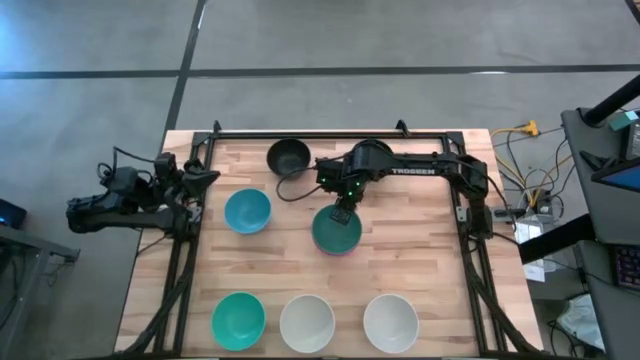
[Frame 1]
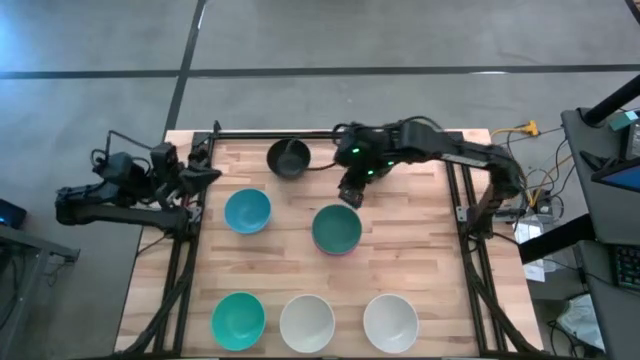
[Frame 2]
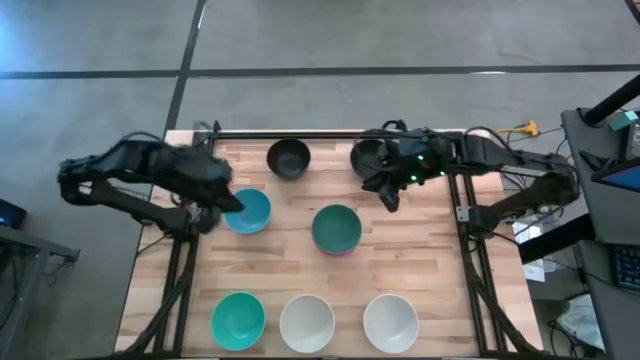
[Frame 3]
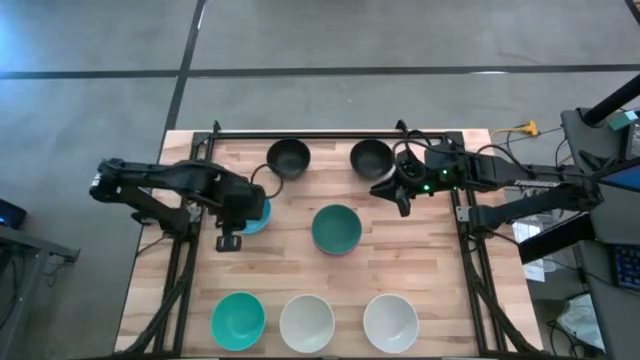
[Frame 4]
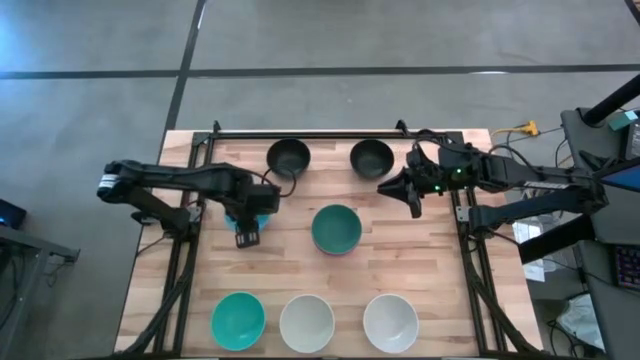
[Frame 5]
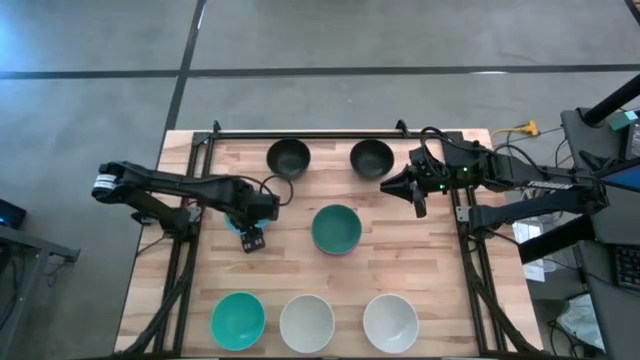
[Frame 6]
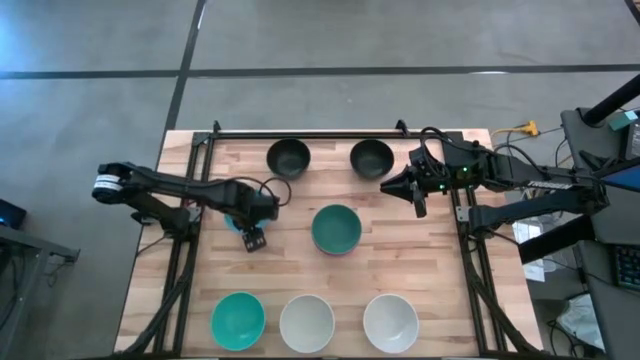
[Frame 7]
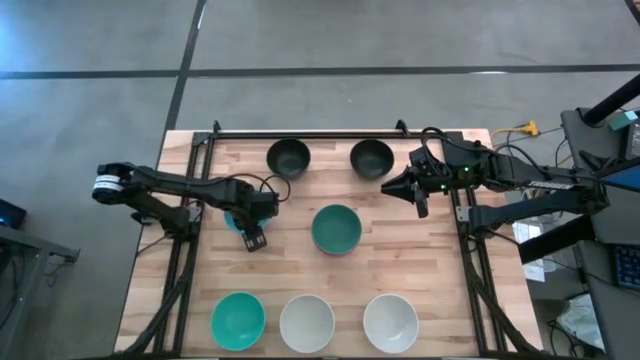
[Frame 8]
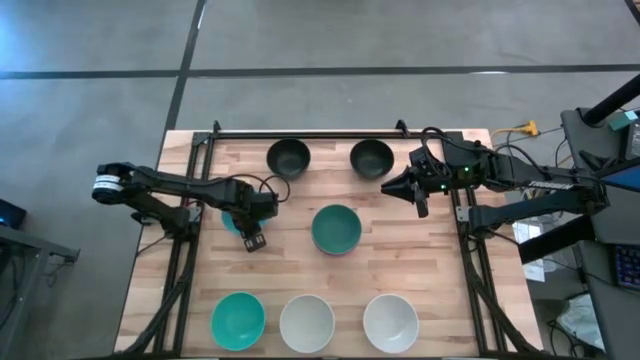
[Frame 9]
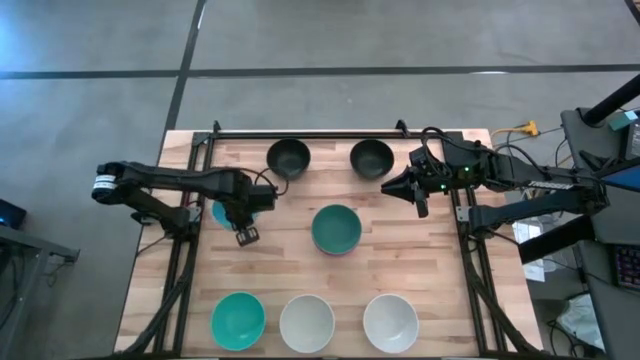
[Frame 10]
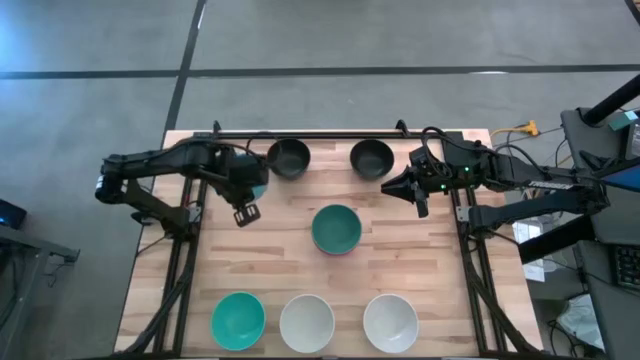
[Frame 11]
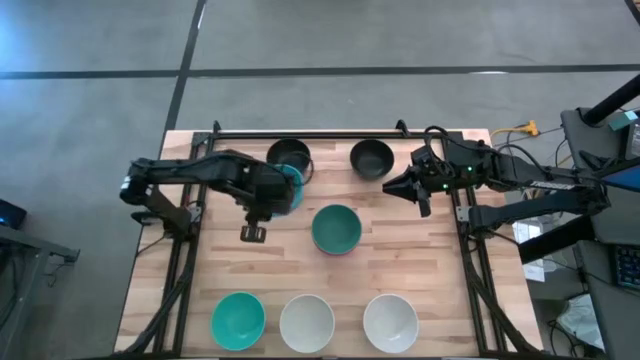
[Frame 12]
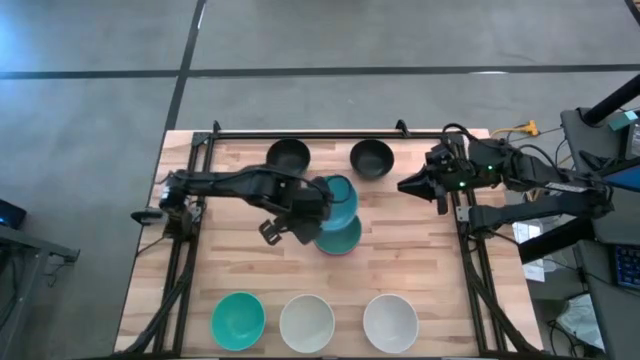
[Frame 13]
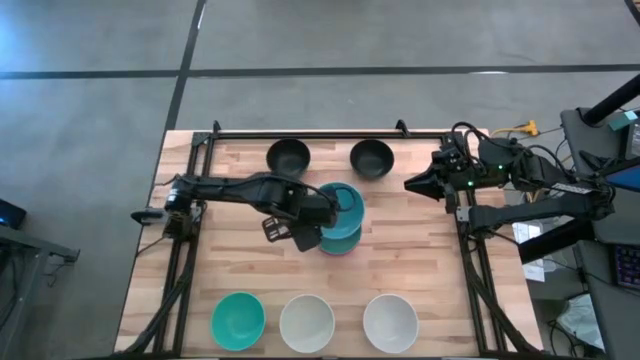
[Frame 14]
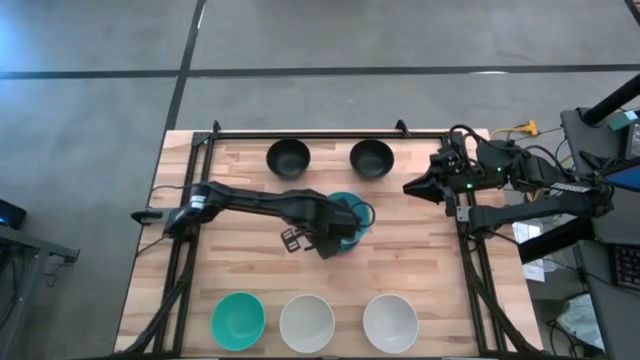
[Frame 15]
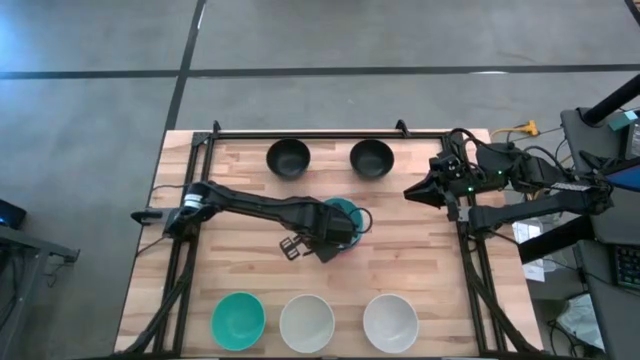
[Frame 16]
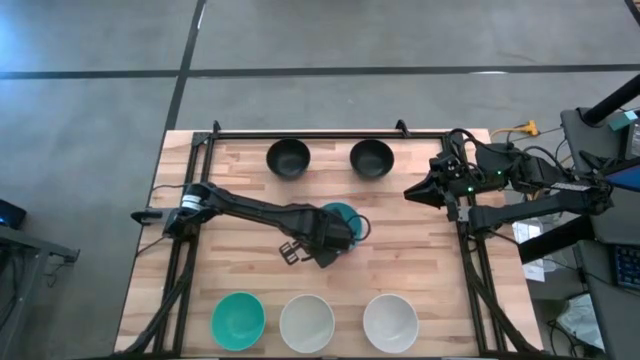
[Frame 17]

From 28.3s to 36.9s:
Task: Nest bowls inside each other
Stack the blue bowl on the green bowl

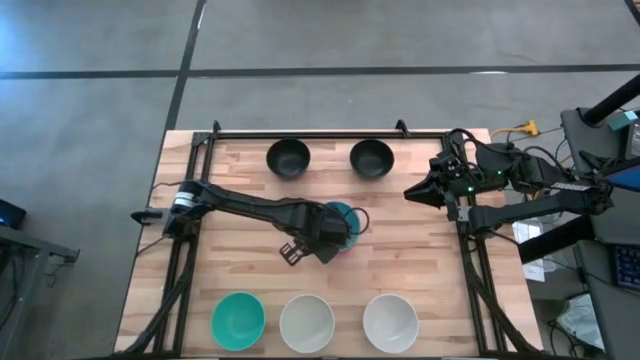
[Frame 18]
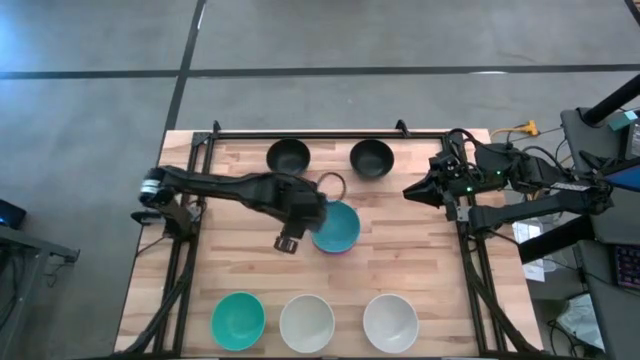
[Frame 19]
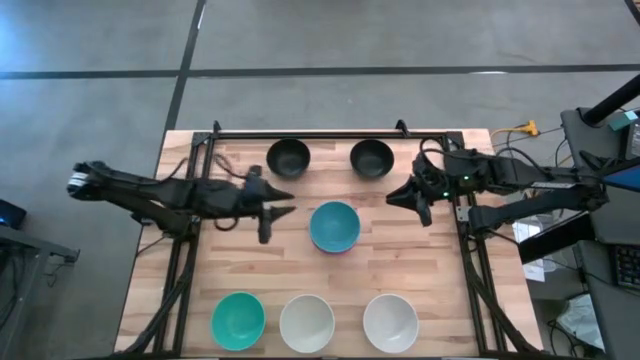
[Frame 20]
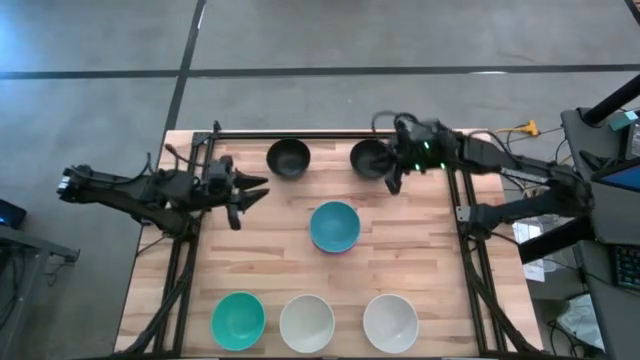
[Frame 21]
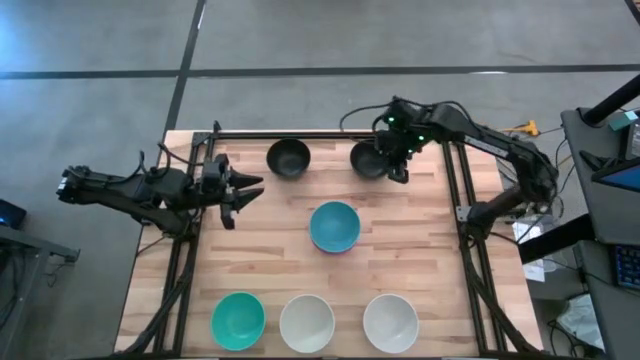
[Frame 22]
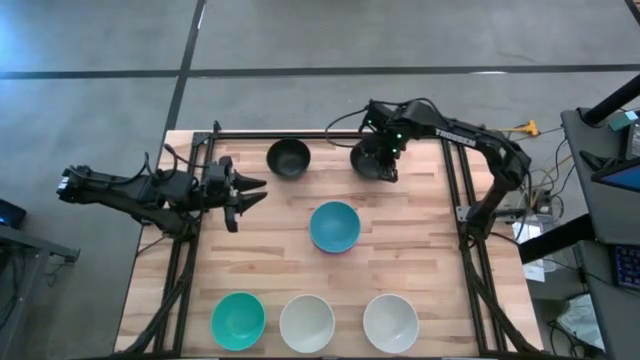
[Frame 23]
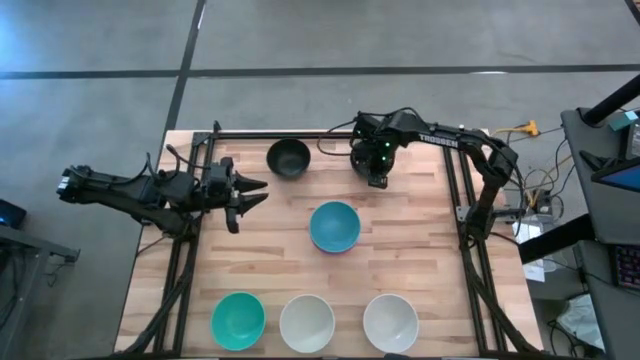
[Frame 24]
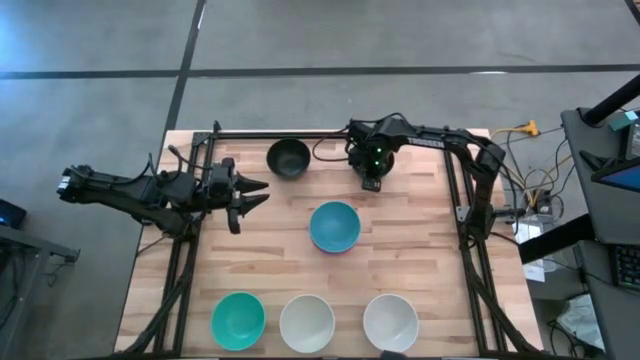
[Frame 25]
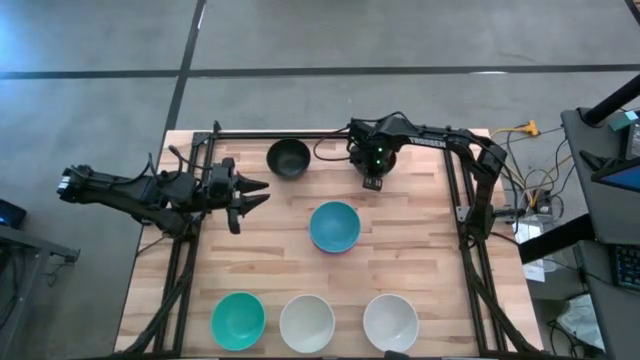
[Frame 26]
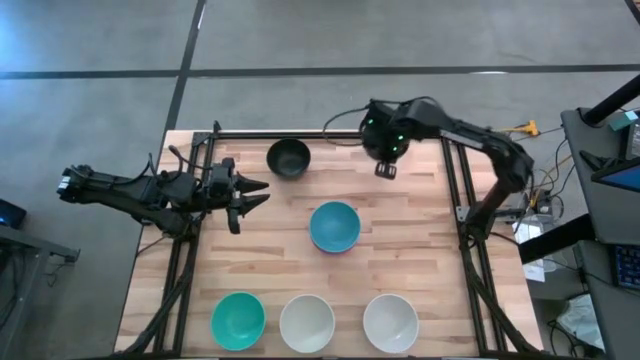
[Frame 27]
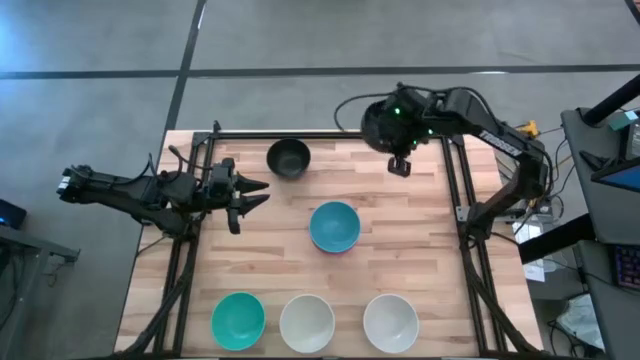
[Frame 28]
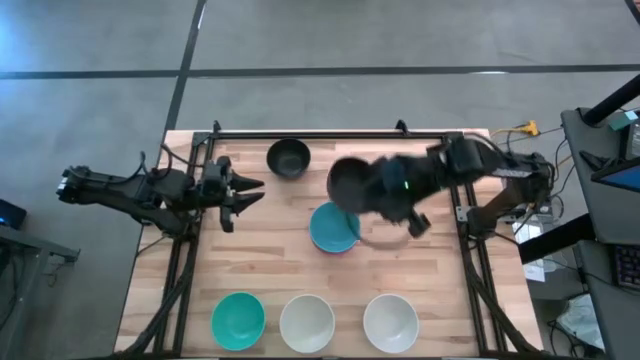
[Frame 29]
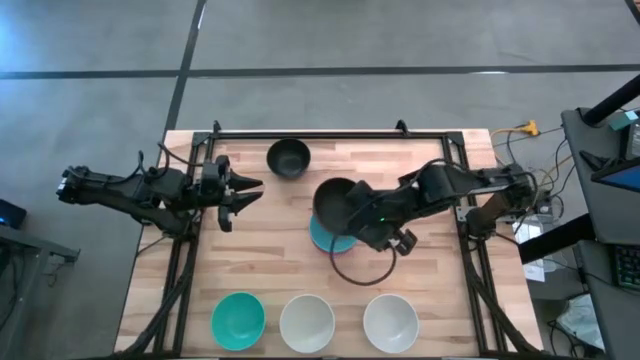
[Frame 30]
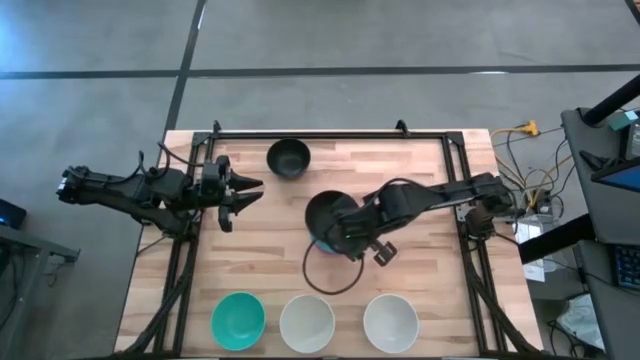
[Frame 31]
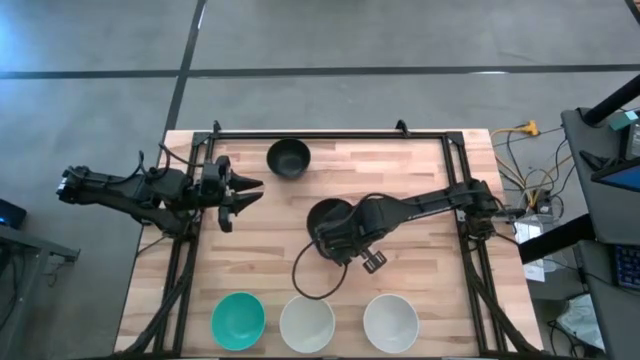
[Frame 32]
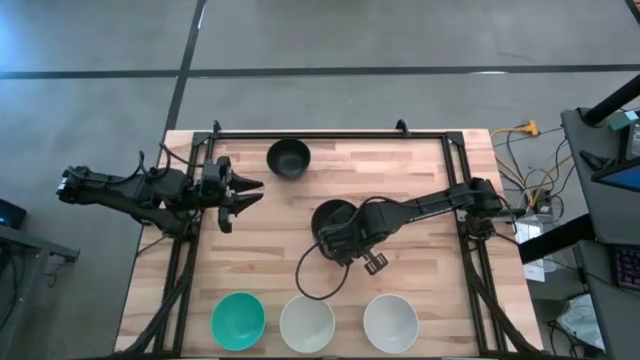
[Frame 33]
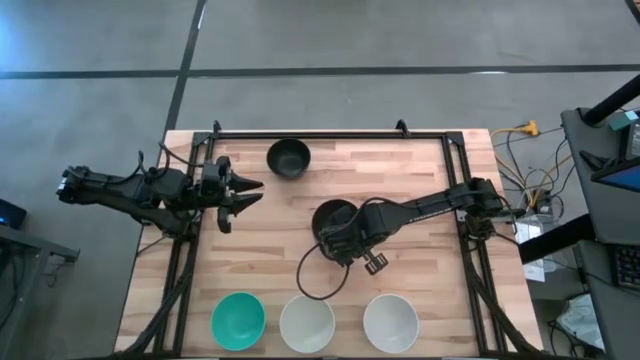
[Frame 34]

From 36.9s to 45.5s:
Stack the right black bowl on the blue bowl

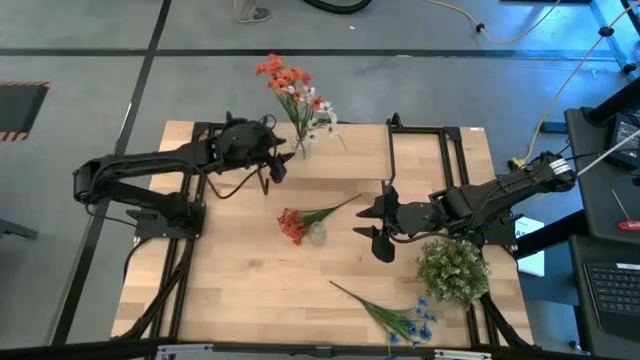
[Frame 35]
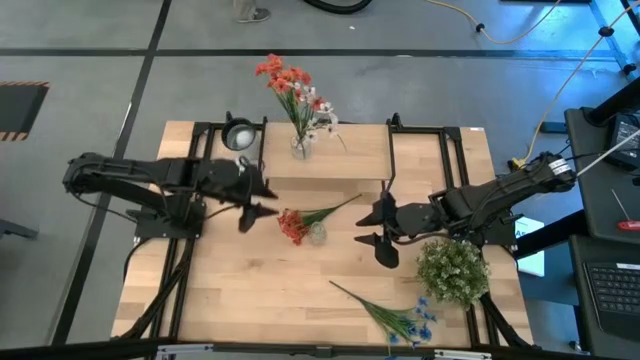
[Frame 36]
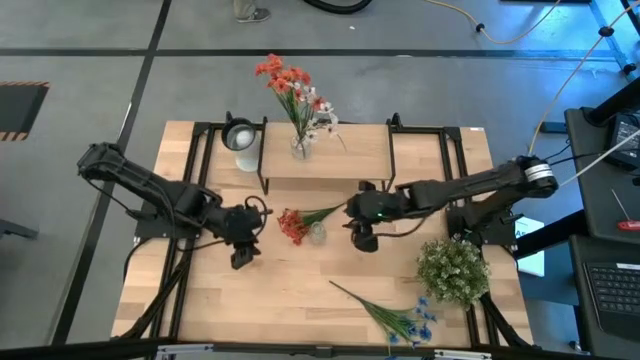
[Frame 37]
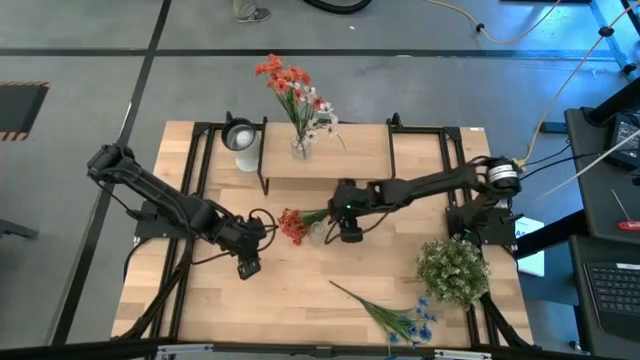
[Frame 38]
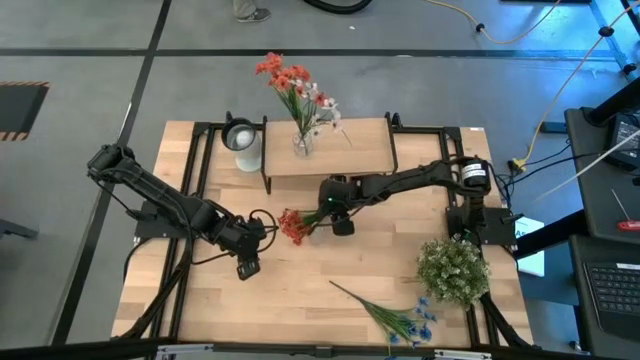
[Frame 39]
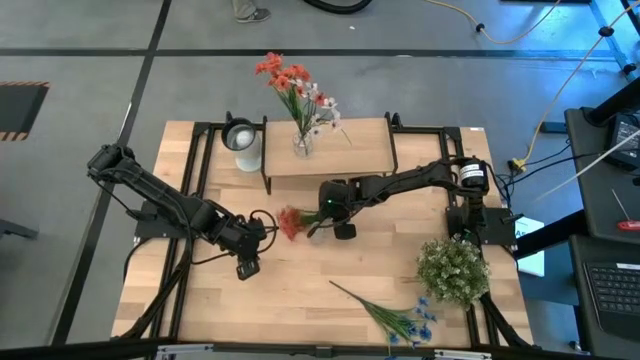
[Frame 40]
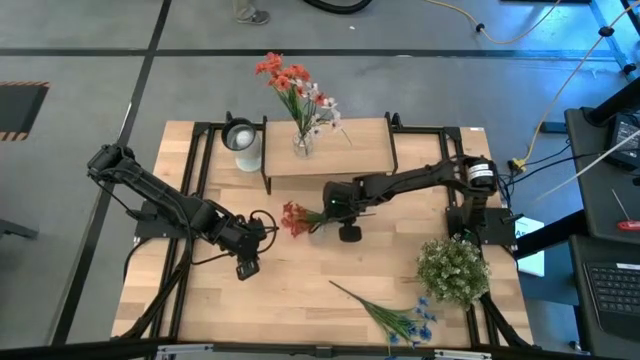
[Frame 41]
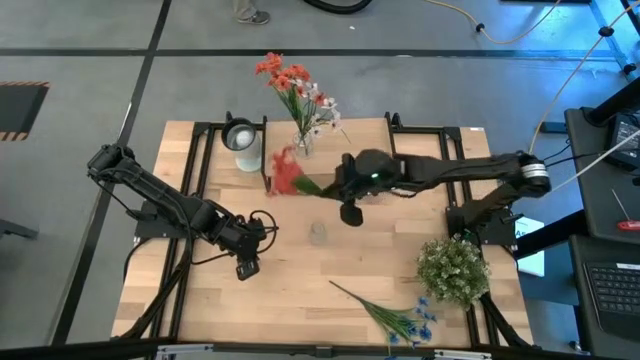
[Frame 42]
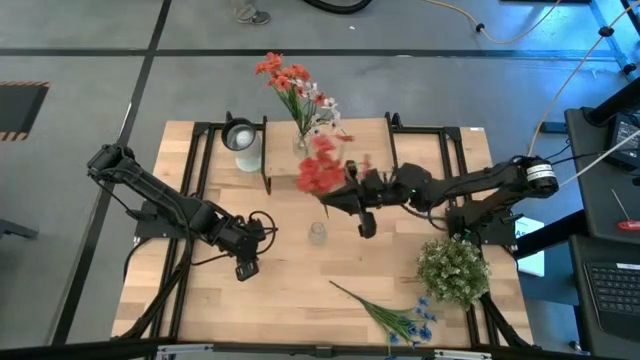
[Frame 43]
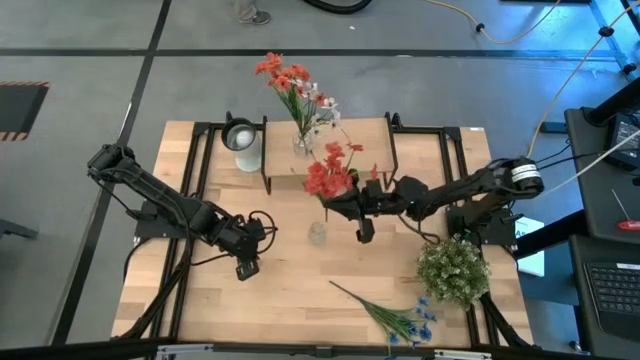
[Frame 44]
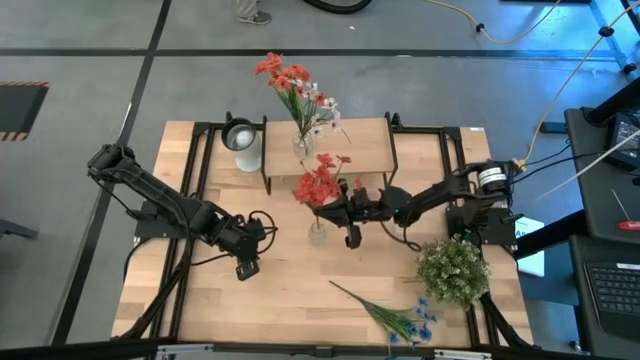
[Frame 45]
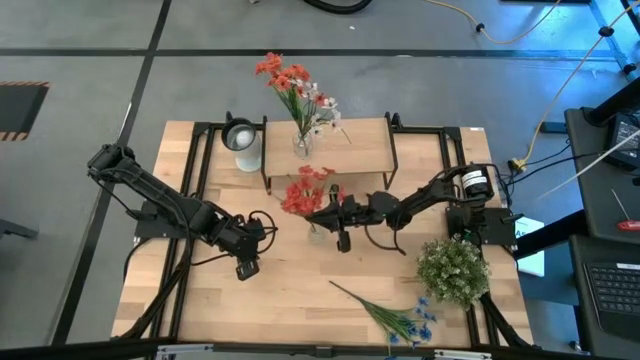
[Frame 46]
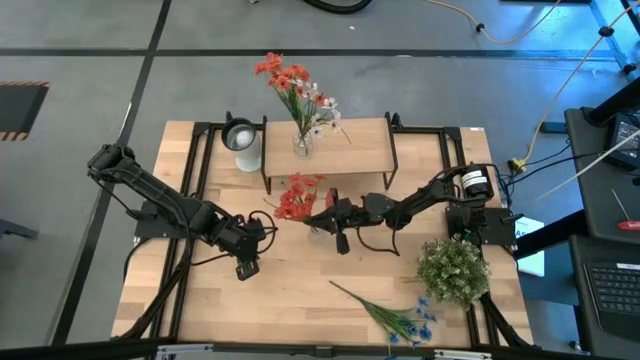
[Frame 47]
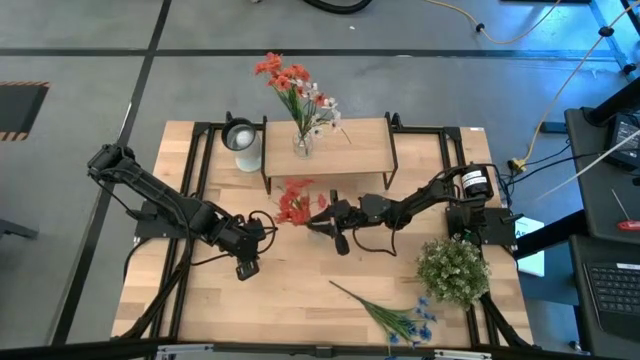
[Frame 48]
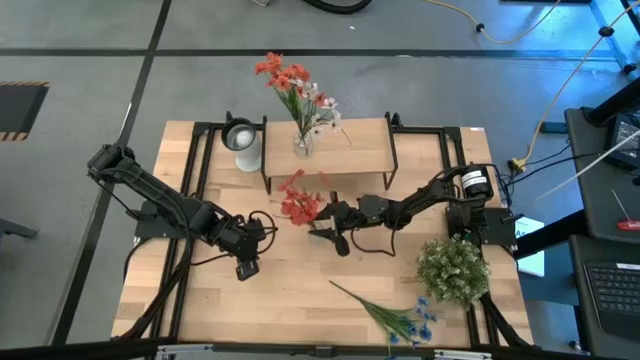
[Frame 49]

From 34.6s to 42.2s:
Task: Pick and place flowers into a vace then onto a shelf
Put the orange flowers into the transparent vase
